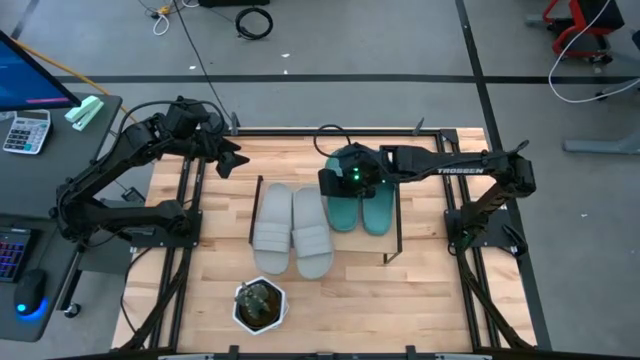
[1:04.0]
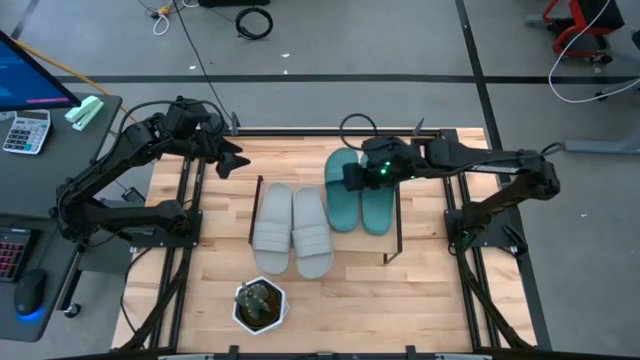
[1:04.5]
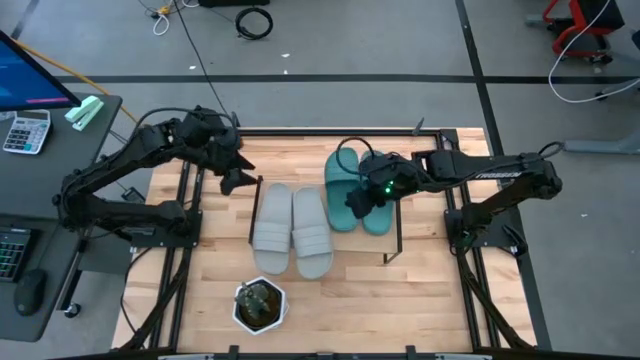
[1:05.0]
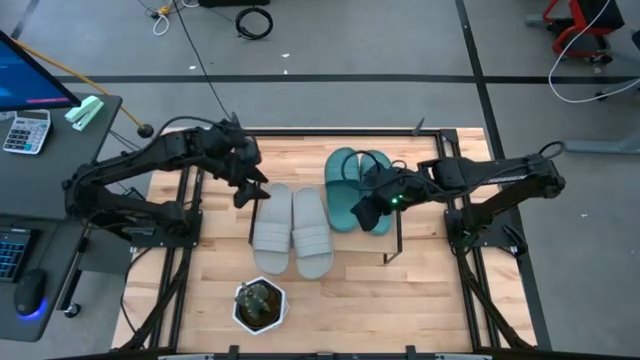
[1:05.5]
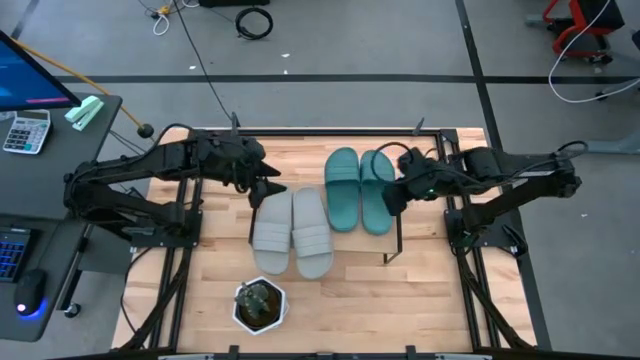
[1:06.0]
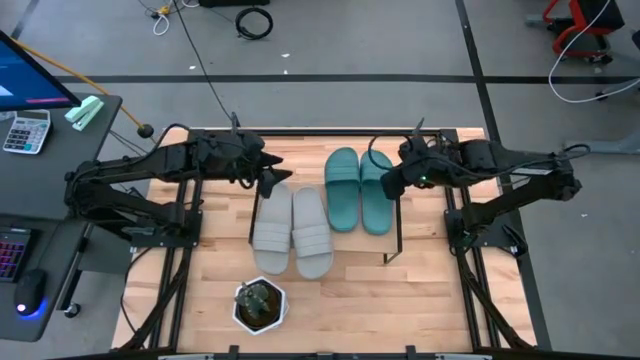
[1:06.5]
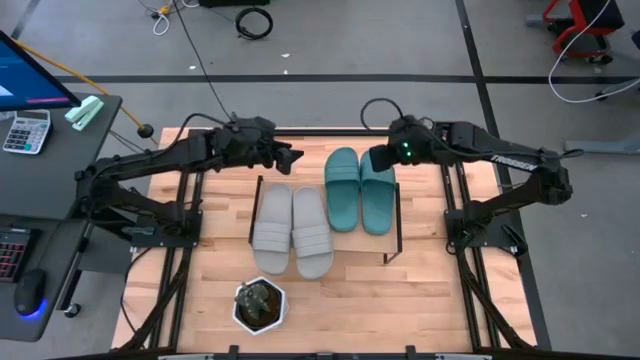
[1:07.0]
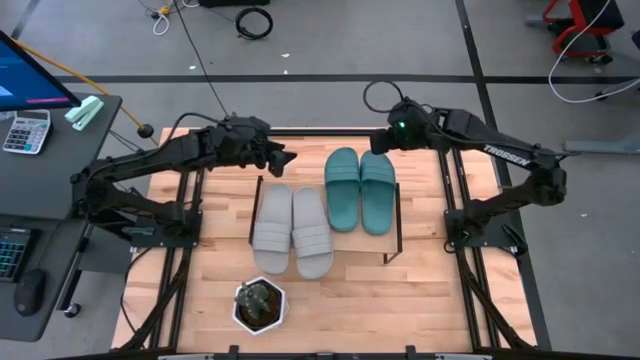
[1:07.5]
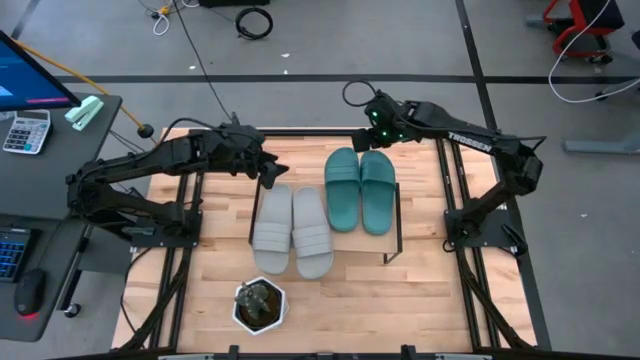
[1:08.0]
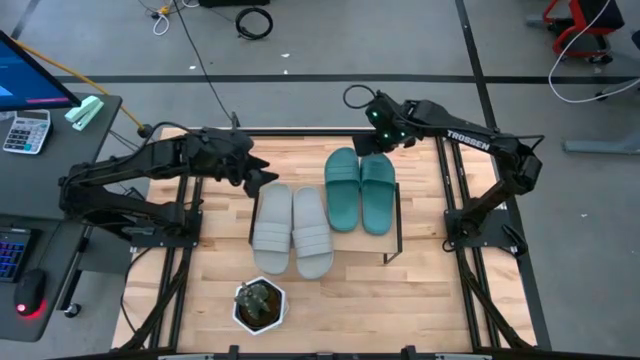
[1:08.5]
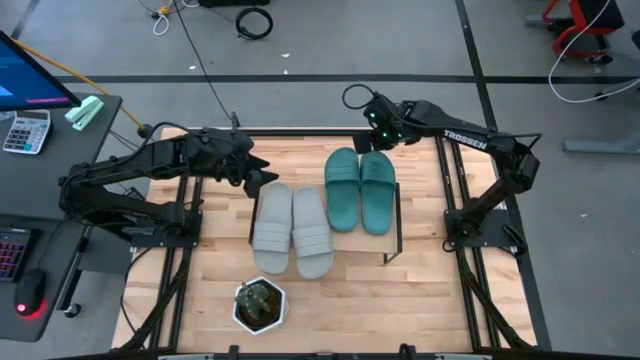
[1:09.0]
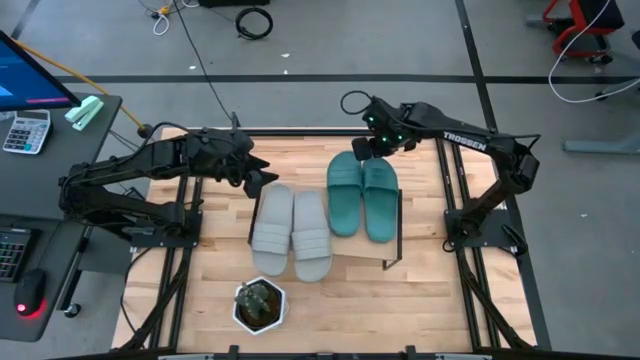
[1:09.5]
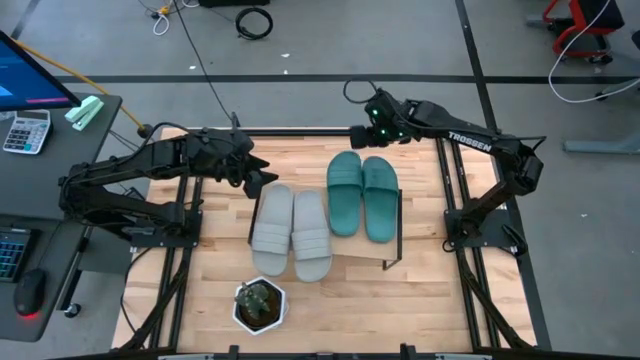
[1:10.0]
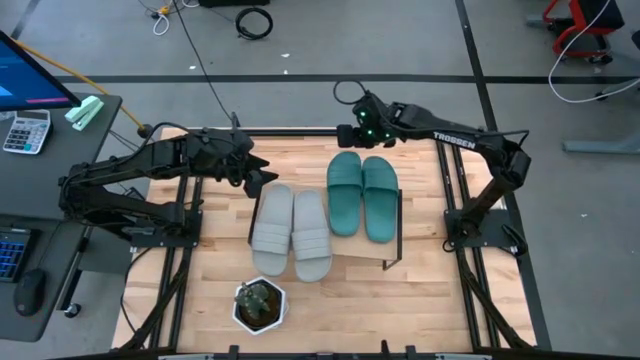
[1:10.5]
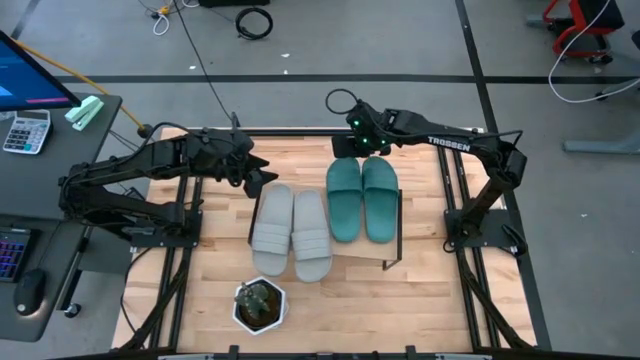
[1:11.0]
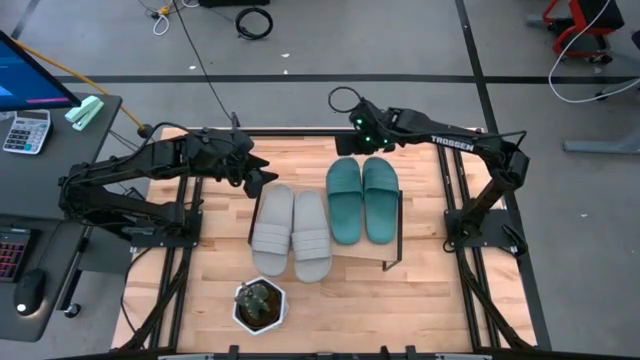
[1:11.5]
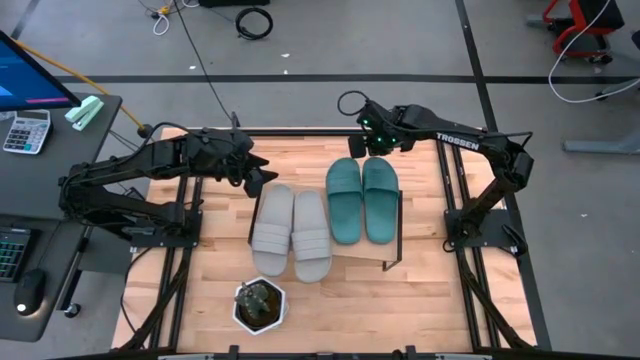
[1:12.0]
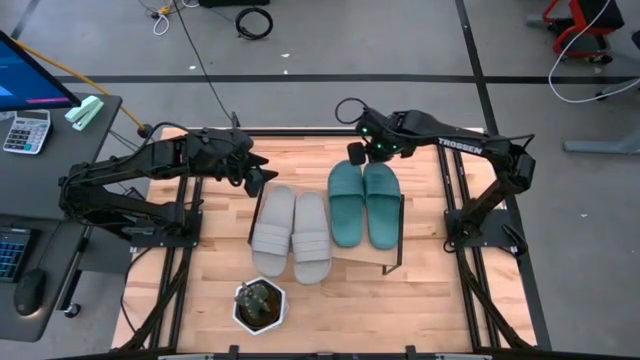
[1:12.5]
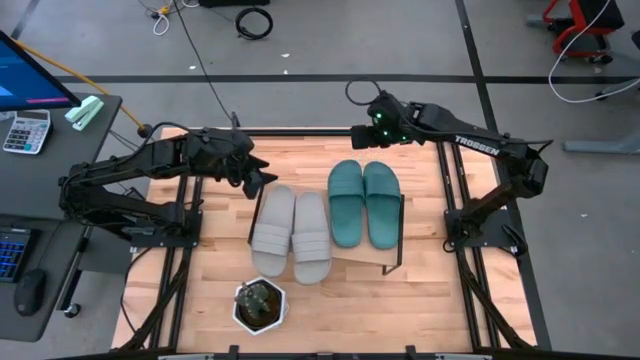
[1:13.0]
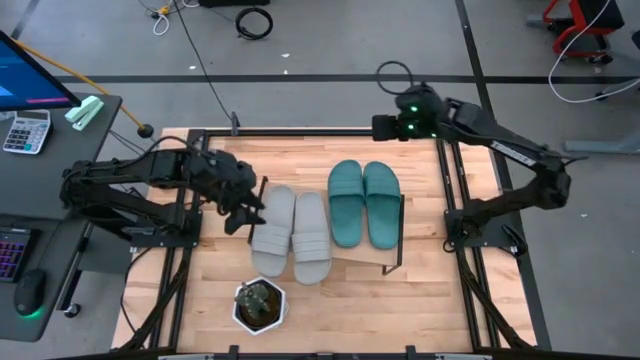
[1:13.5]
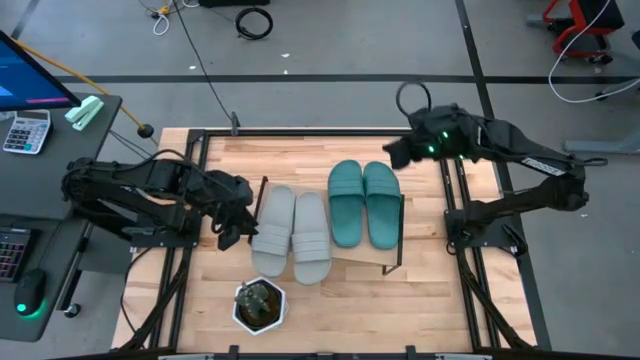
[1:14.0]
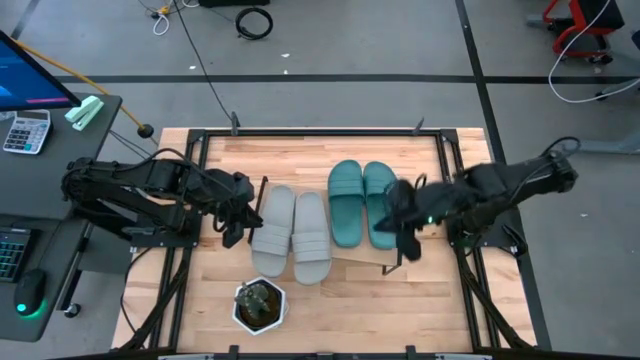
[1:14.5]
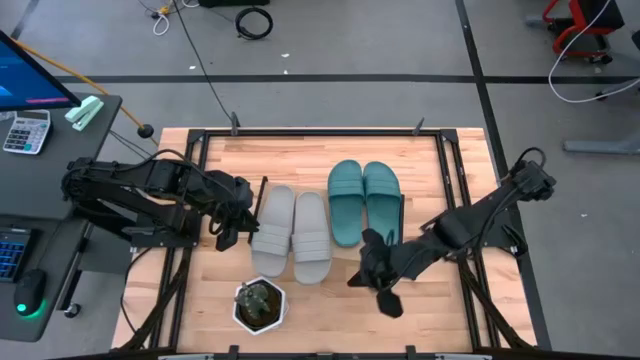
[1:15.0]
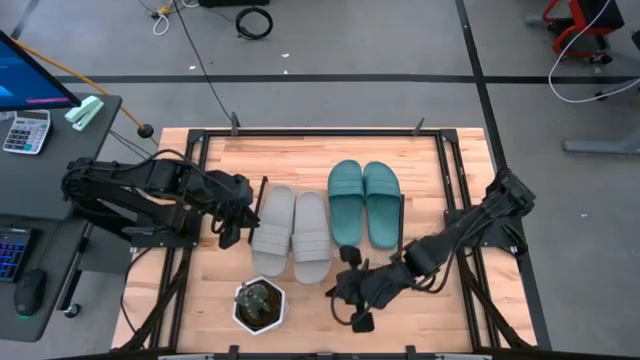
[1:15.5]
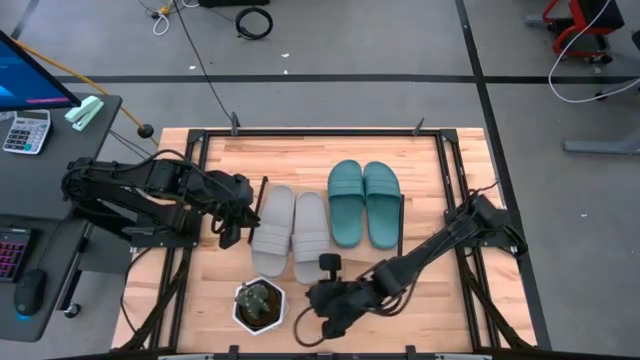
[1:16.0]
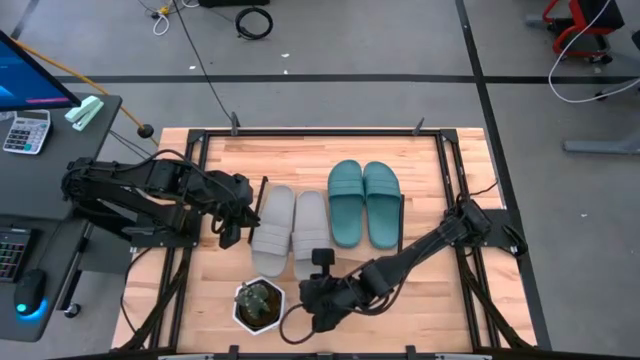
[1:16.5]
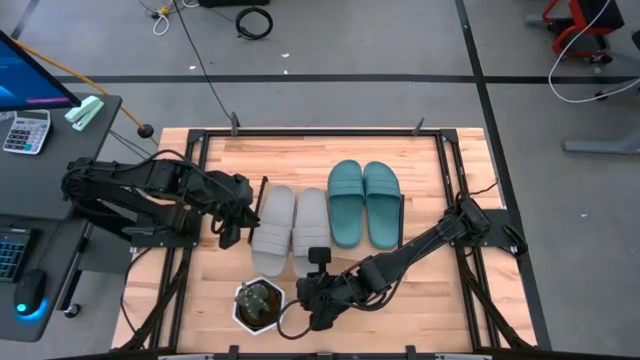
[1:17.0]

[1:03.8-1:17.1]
Task: Pick and place slides into the shelf
Adjust the slides on the shelf

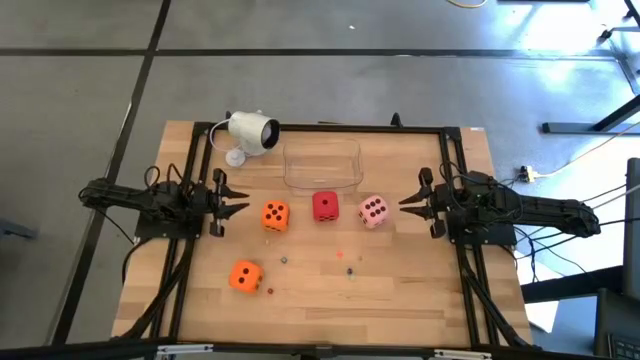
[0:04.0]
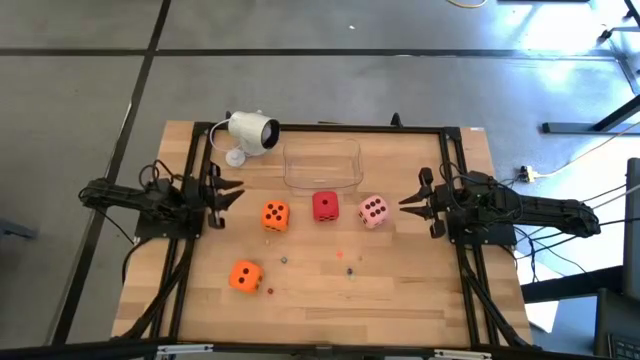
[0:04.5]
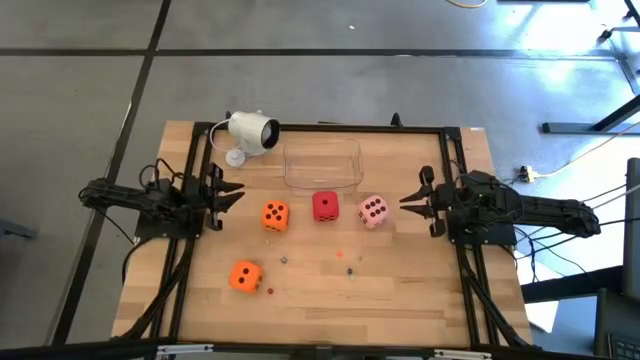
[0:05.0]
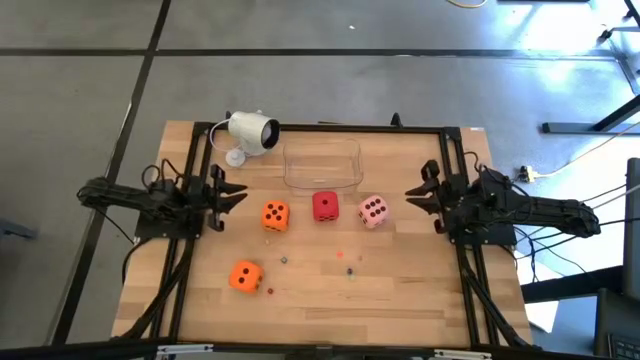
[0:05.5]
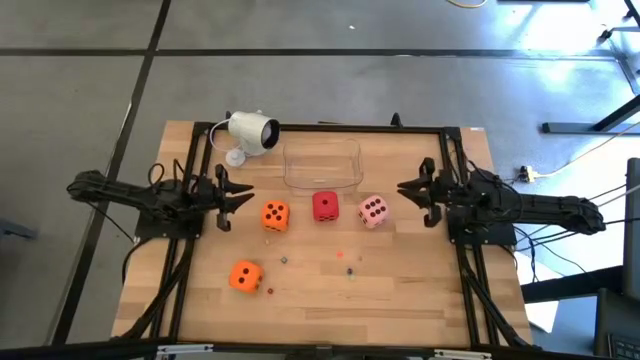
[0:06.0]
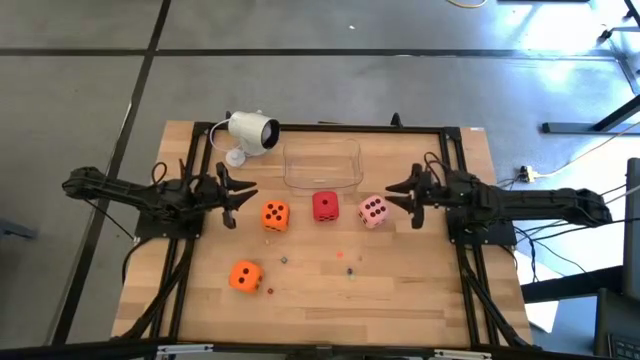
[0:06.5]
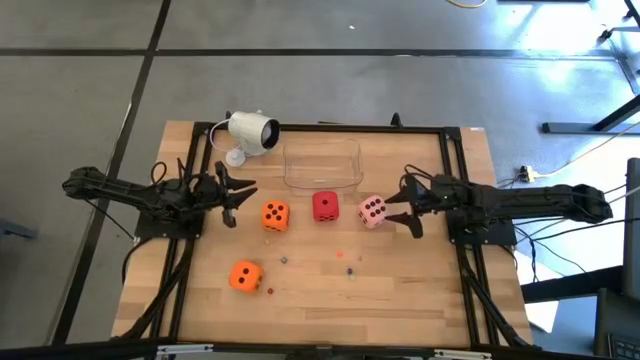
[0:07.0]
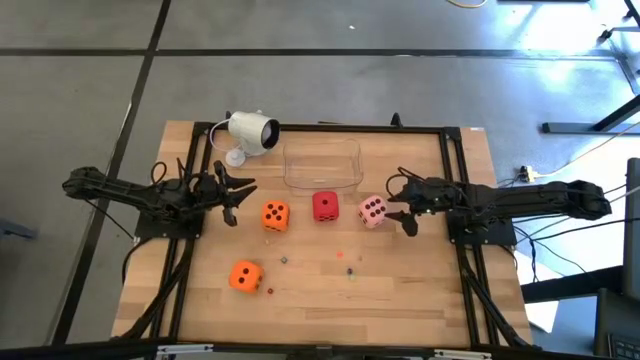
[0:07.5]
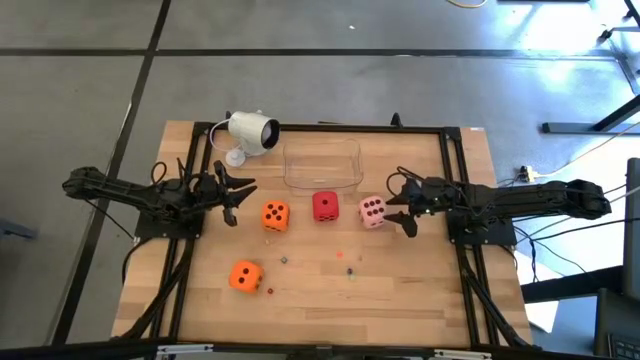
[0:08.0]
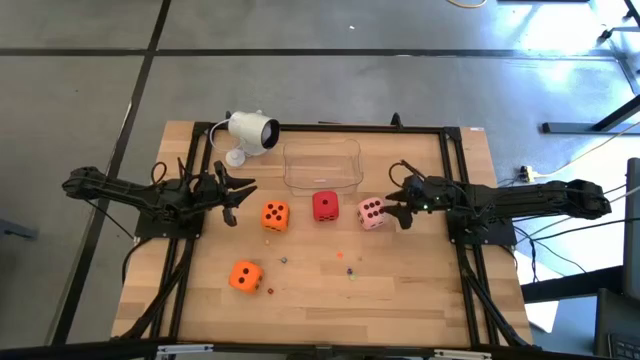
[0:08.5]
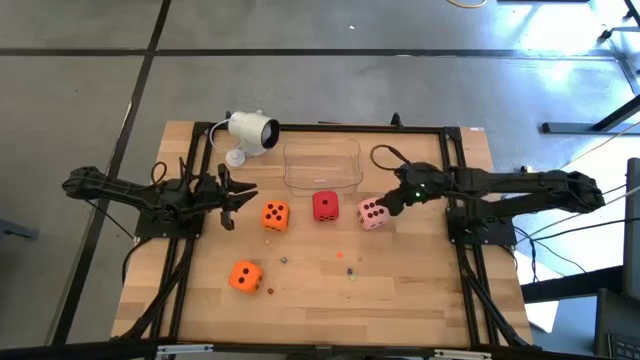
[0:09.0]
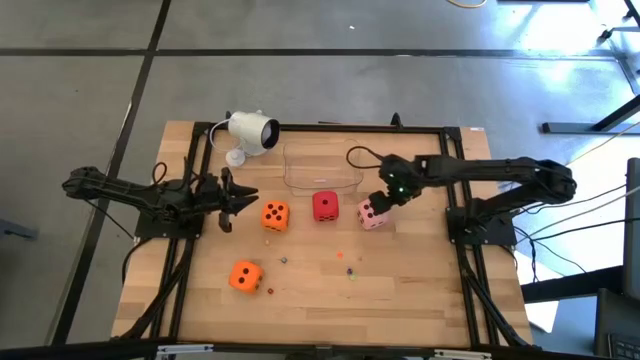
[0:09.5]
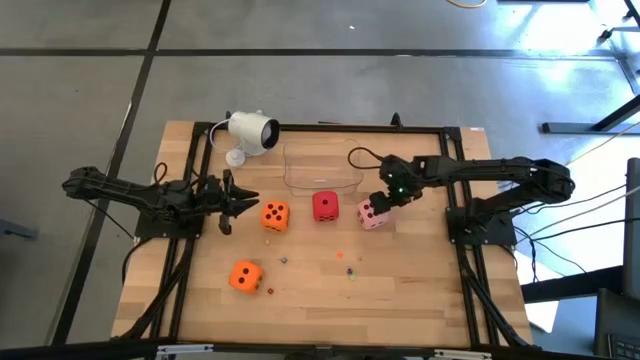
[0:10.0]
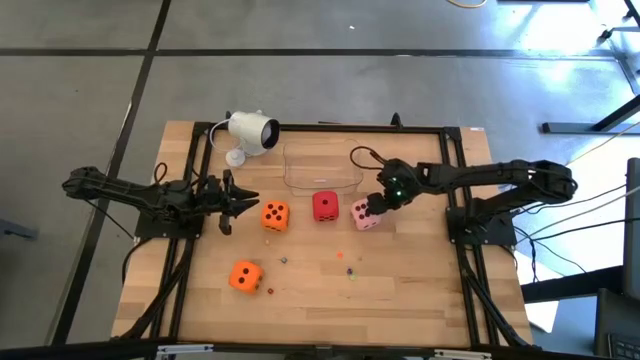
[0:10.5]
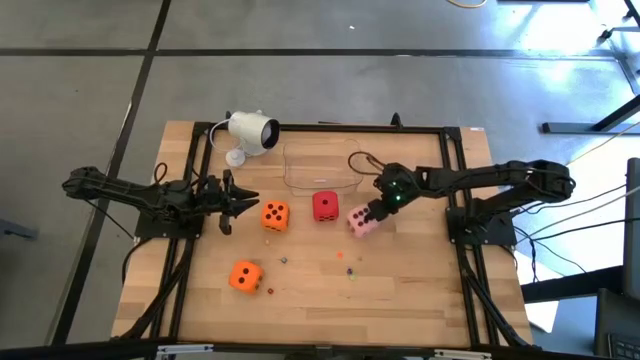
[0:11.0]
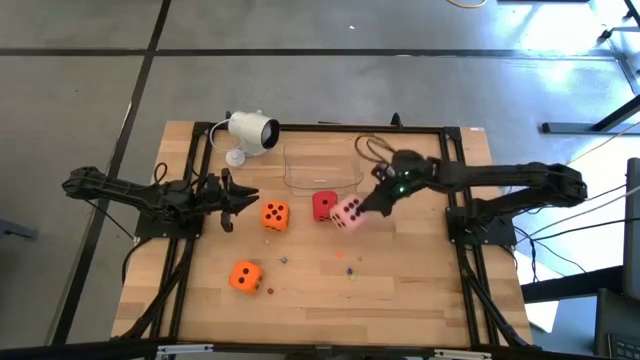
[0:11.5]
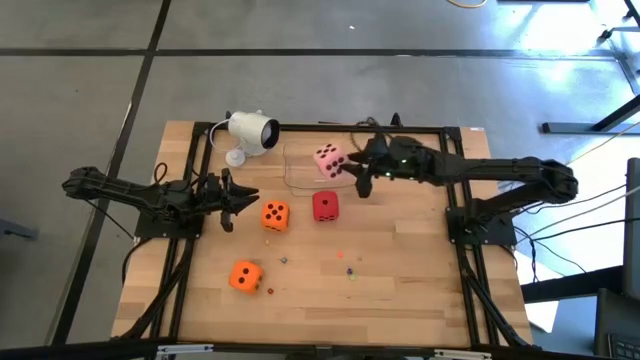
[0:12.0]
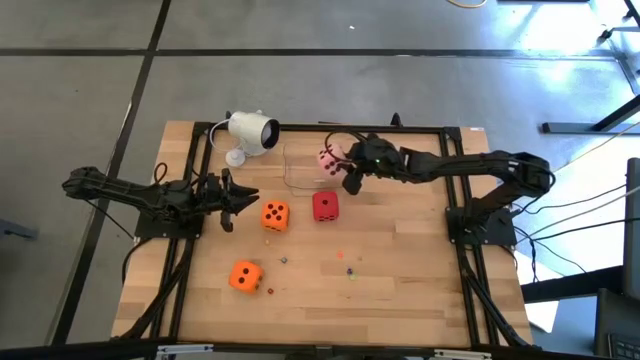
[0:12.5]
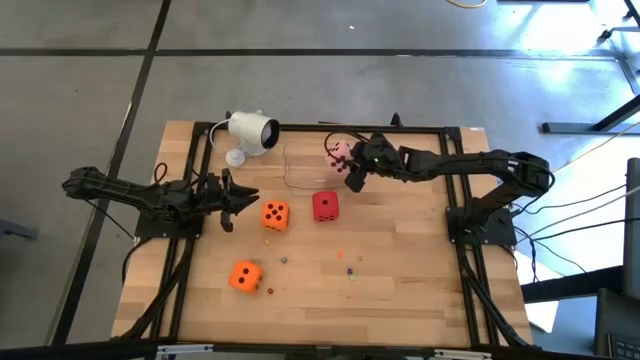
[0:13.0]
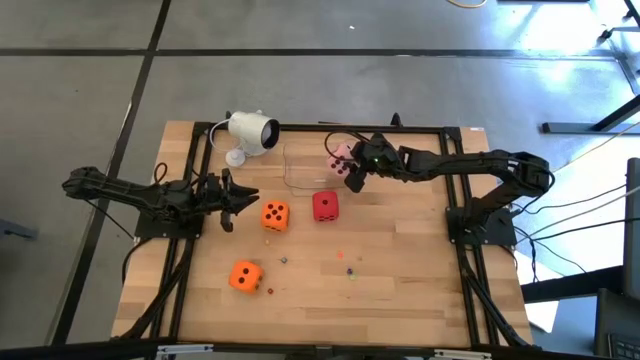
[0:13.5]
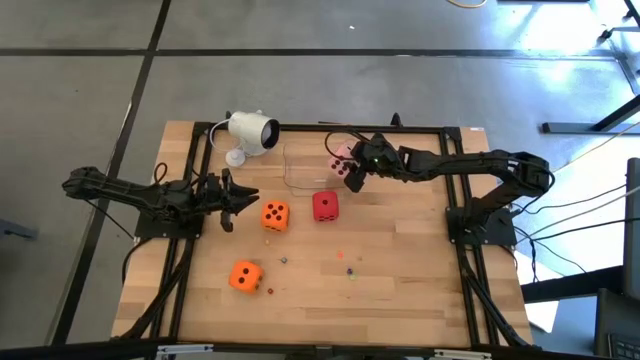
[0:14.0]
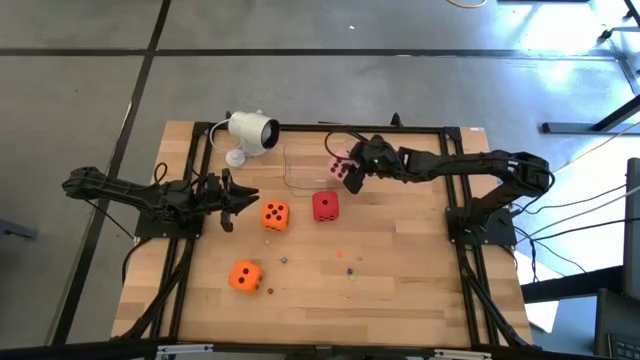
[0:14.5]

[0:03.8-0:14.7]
Task: Pick & Place Dice
Put the large pink die into the transparent bin
